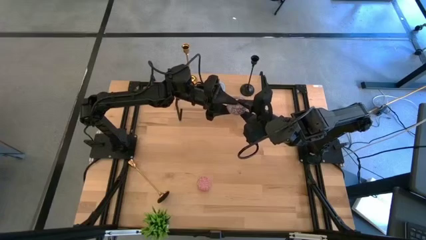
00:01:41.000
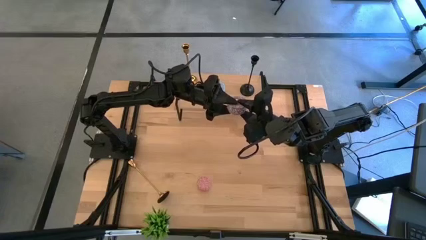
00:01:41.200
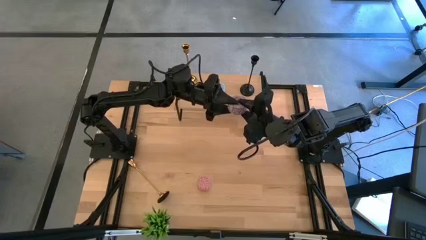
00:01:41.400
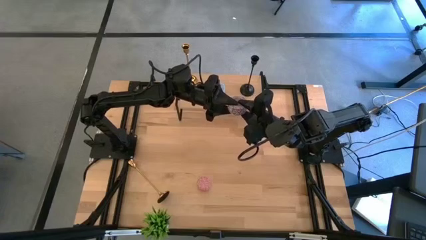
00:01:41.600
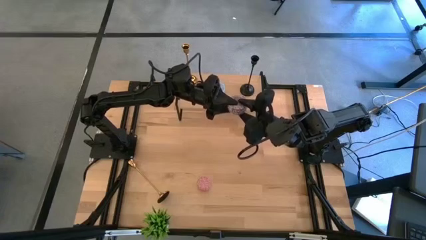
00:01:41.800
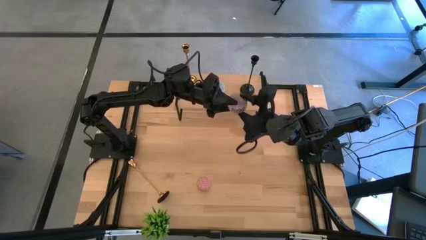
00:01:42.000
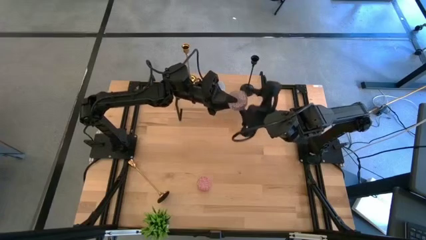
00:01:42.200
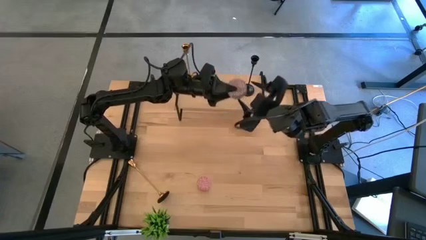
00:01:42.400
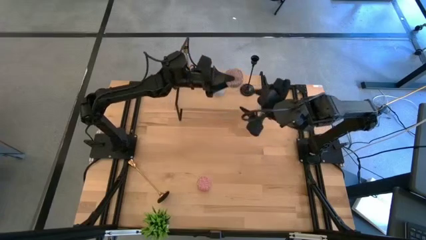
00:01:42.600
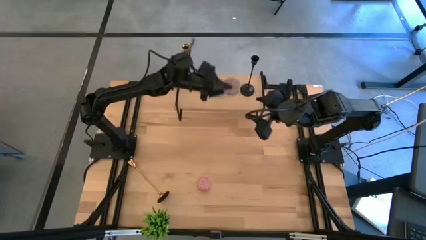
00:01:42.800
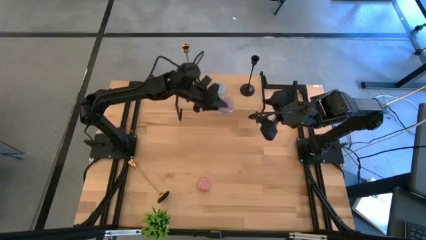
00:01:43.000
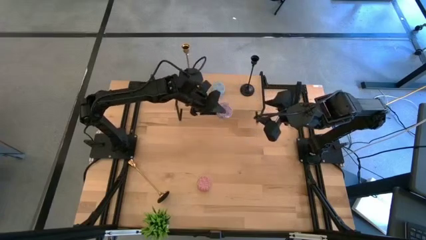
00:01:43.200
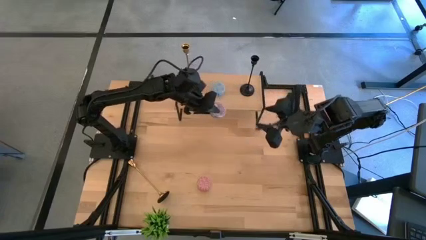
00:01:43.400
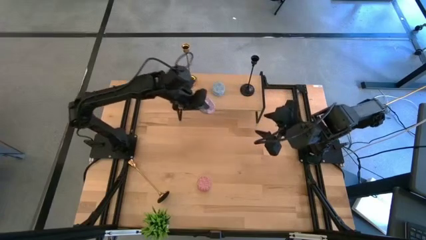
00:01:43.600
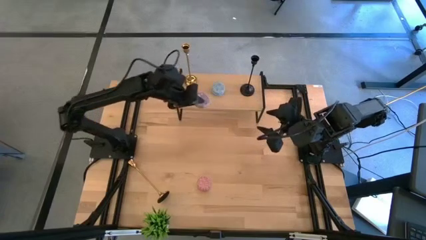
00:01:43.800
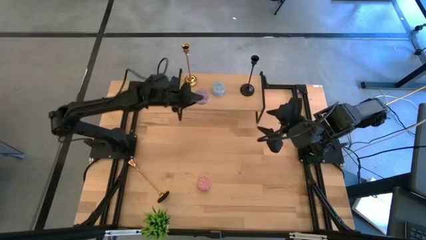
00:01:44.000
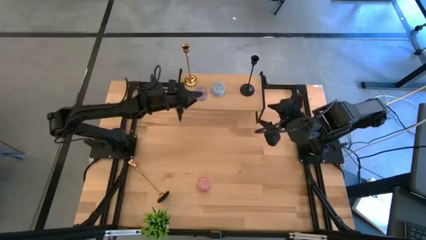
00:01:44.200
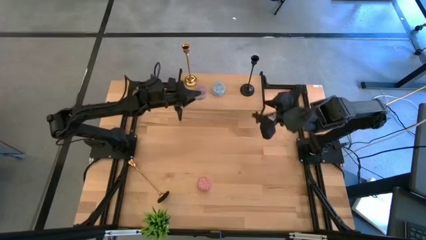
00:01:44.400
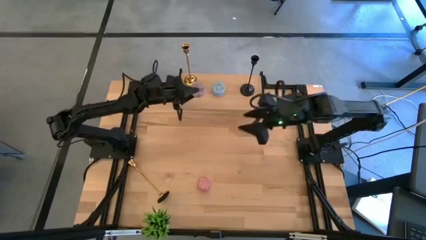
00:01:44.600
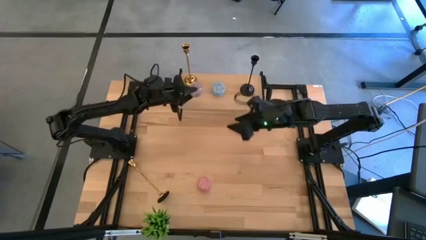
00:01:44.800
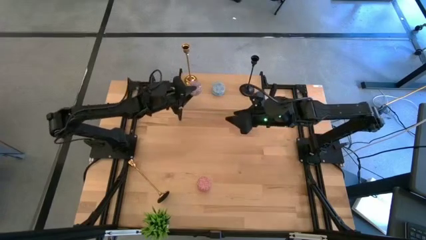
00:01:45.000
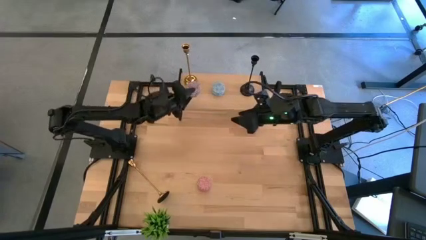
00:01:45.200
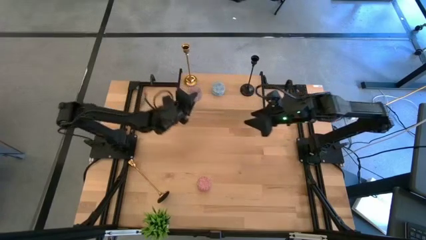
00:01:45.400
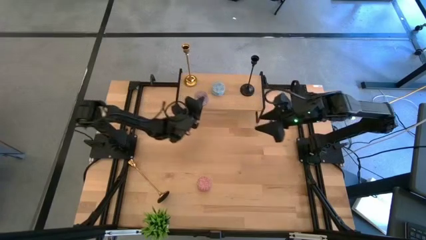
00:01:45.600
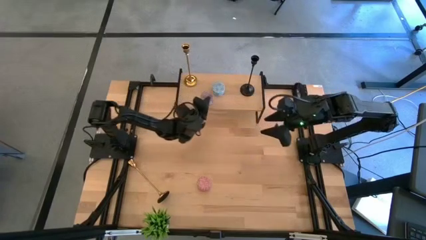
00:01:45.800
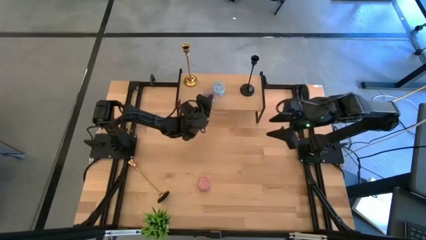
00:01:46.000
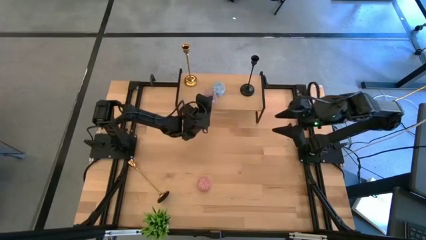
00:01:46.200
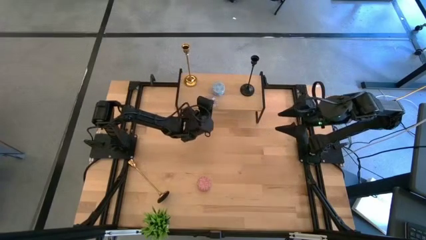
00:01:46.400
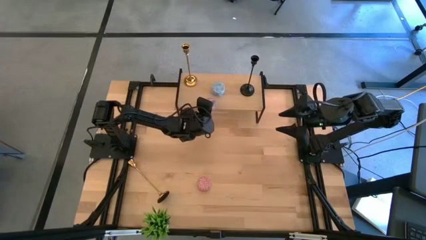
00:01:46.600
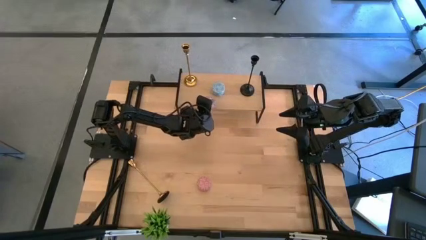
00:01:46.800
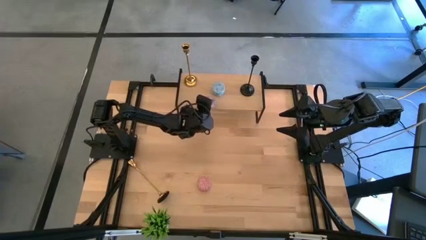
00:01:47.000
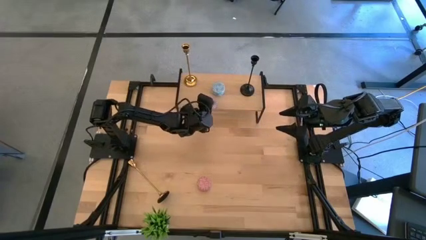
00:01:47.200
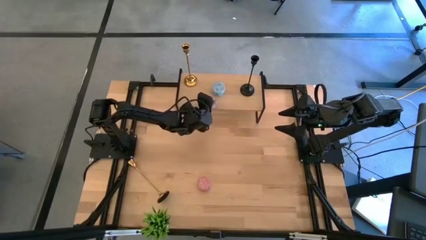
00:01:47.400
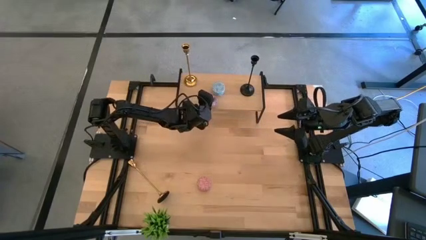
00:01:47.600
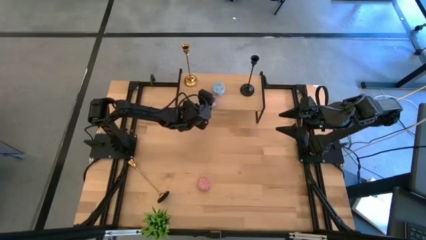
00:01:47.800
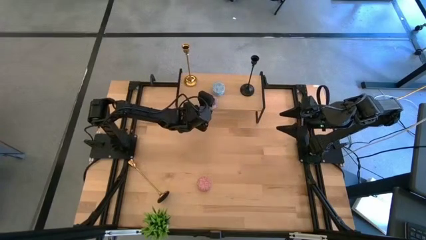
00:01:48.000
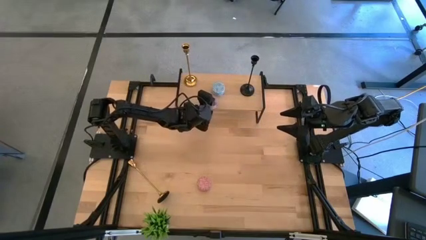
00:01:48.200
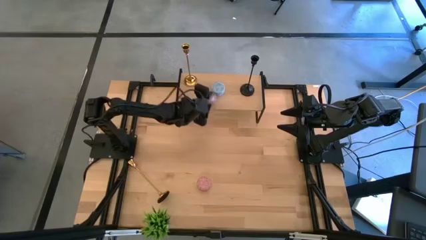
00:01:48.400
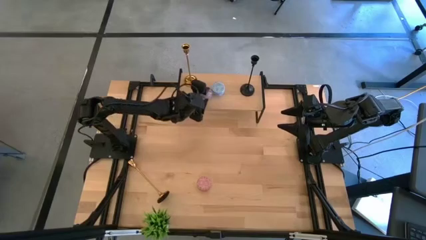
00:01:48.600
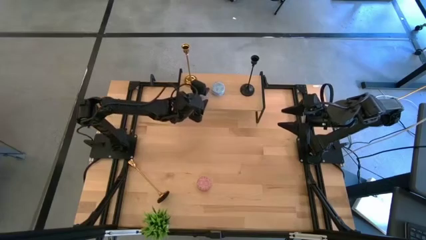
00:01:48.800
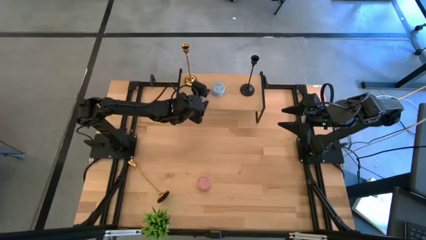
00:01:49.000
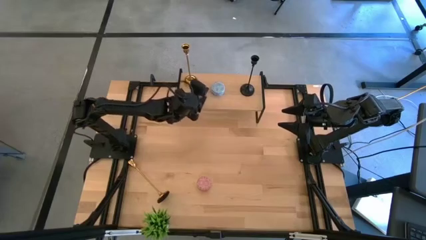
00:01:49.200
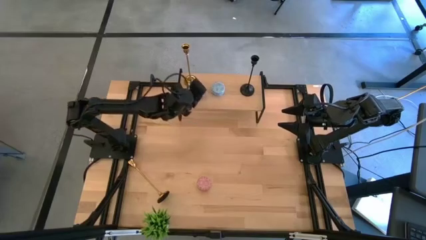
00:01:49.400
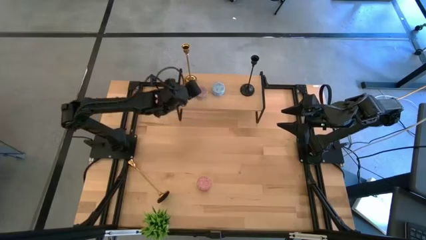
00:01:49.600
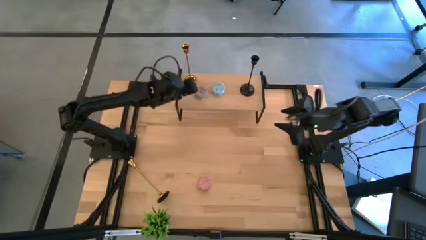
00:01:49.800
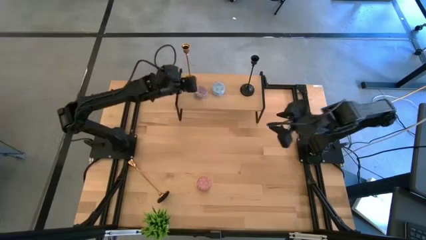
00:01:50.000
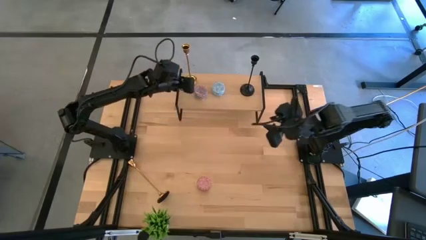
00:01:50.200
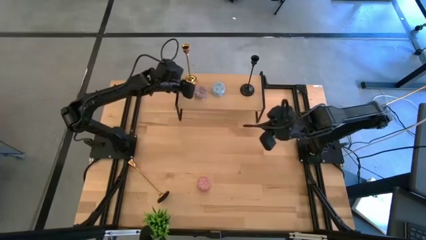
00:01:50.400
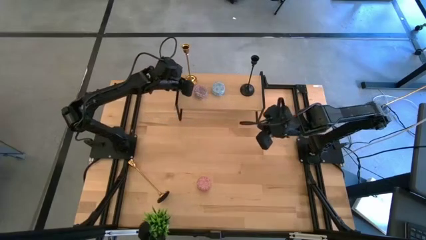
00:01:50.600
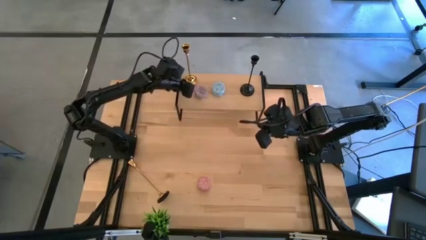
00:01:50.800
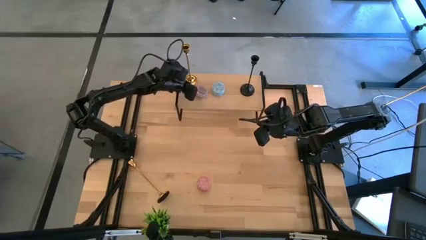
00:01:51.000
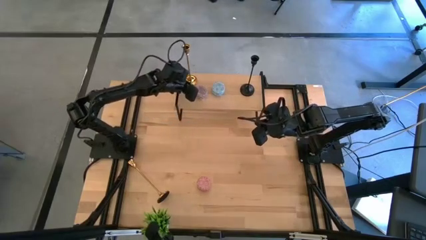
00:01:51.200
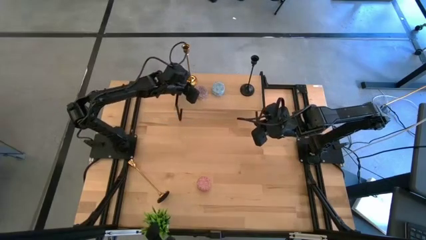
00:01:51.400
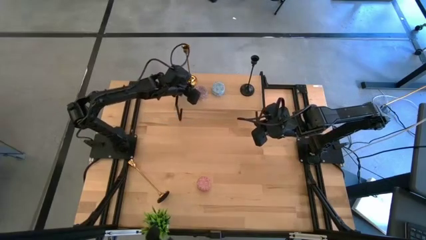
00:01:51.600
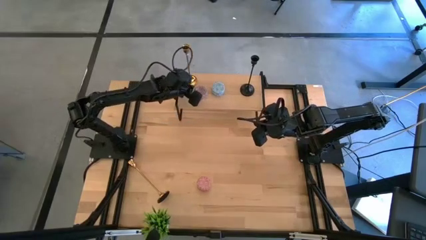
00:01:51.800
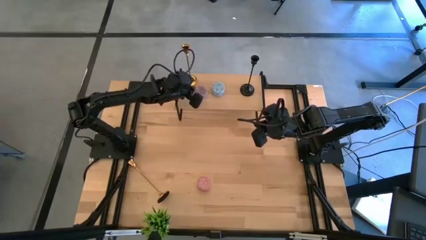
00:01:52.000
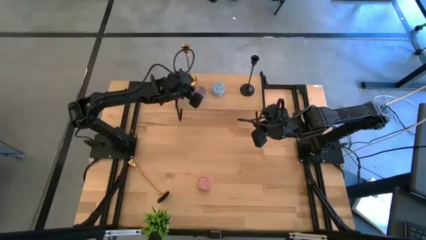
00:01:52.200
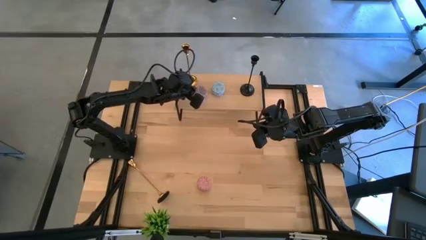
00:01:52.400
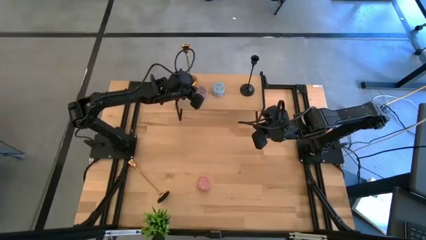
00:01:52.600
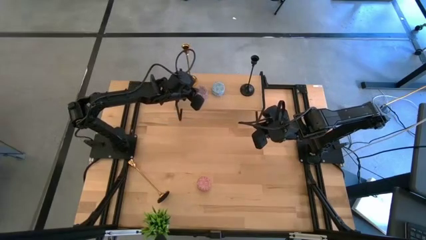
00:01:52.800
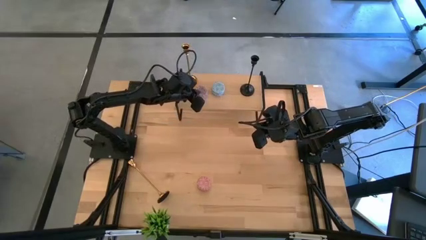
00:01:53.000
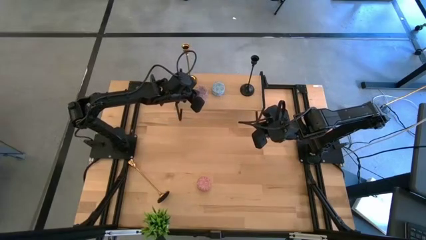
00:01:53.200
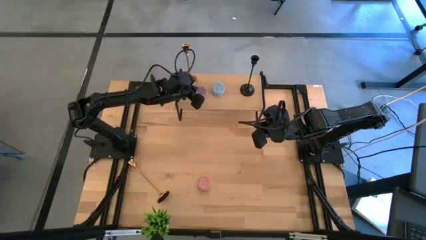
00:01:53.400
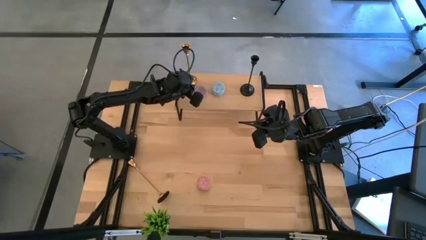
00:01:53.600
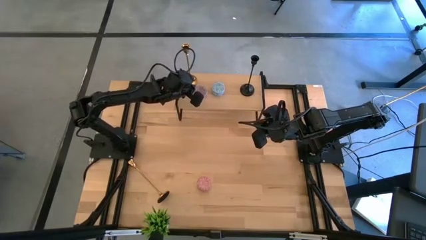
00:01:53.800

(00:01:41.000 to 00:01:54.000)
Task: Pick & Place candle stick holders
Put the red scented candle on the shelf

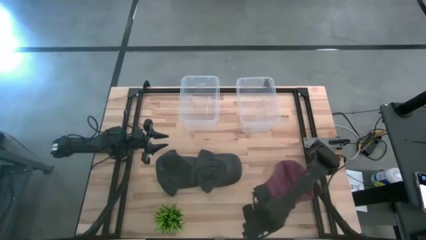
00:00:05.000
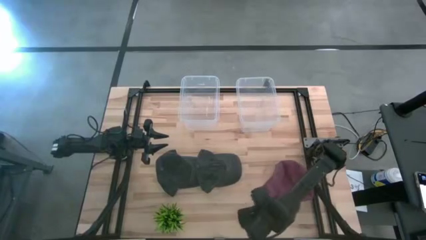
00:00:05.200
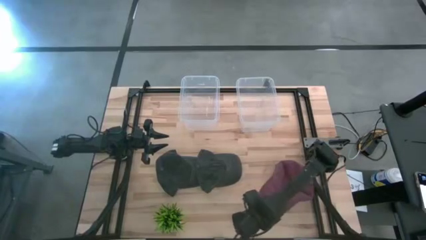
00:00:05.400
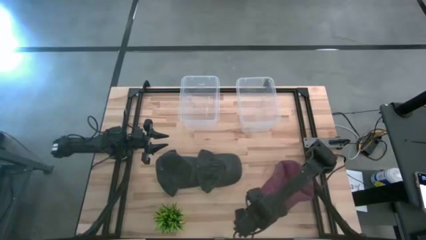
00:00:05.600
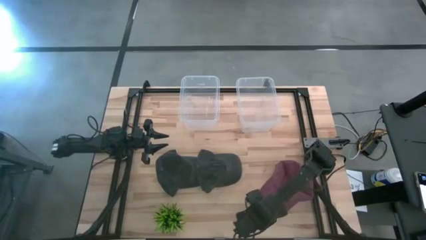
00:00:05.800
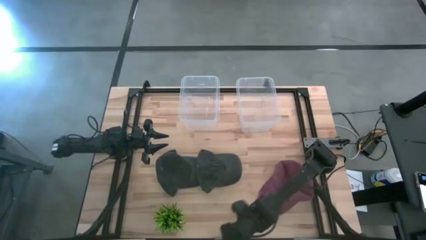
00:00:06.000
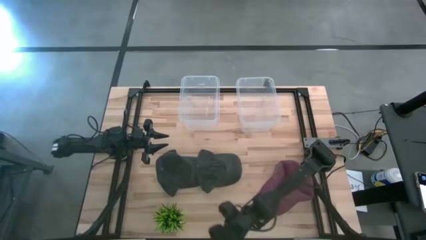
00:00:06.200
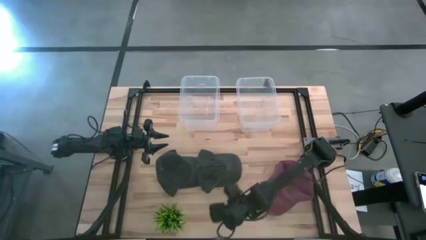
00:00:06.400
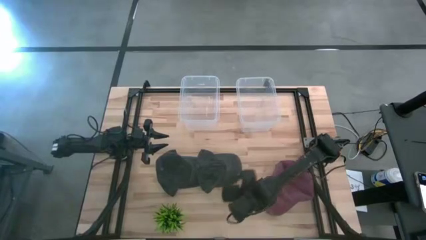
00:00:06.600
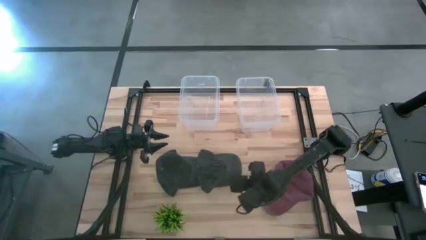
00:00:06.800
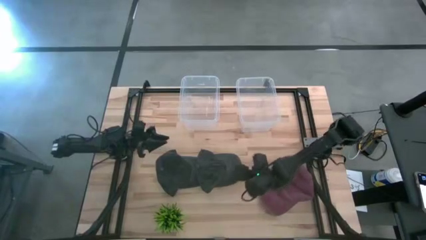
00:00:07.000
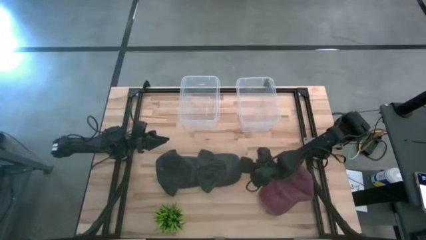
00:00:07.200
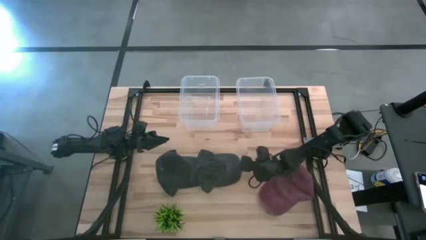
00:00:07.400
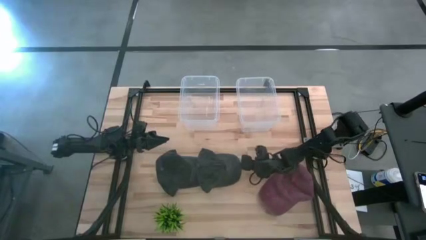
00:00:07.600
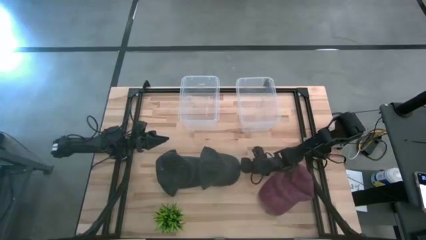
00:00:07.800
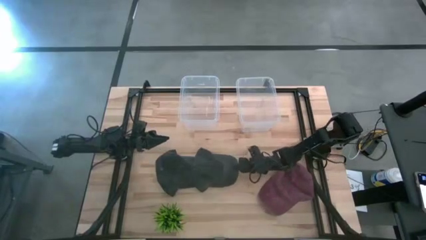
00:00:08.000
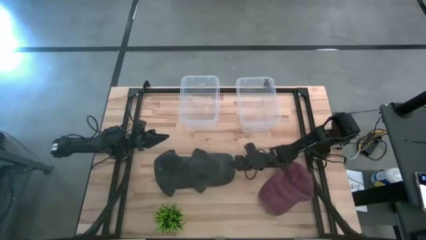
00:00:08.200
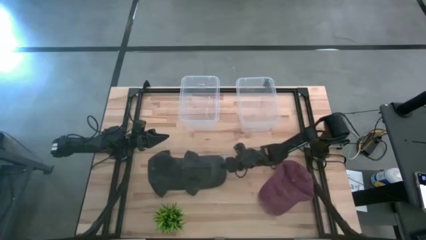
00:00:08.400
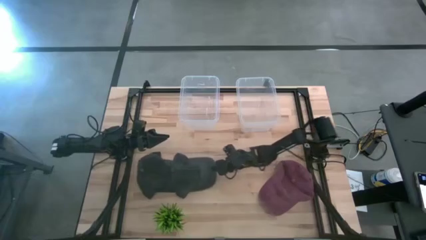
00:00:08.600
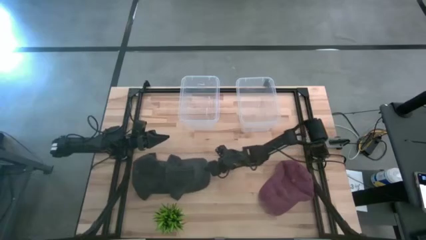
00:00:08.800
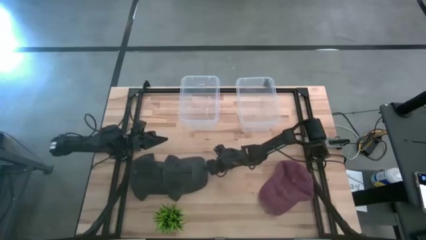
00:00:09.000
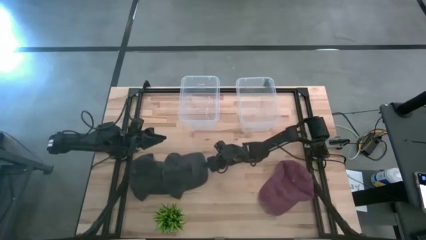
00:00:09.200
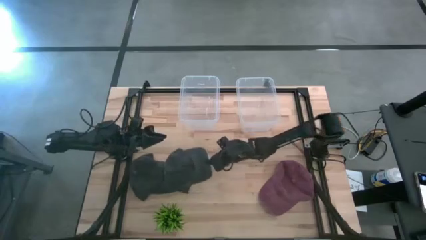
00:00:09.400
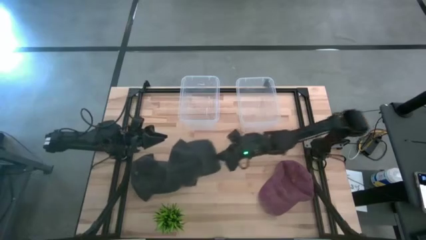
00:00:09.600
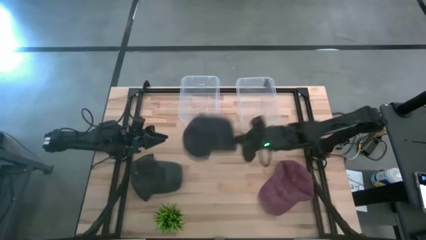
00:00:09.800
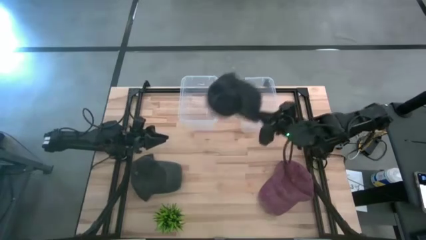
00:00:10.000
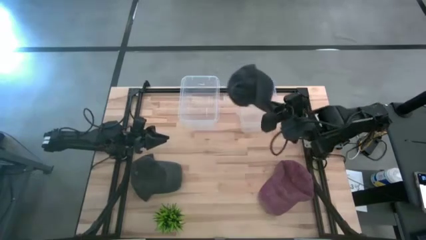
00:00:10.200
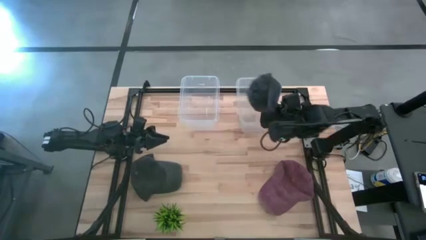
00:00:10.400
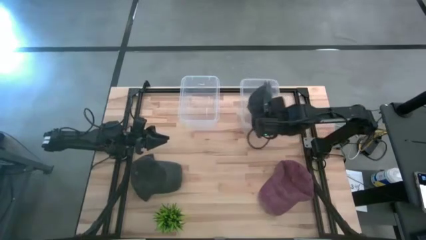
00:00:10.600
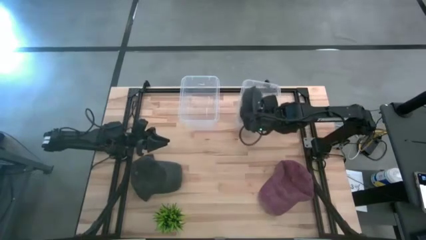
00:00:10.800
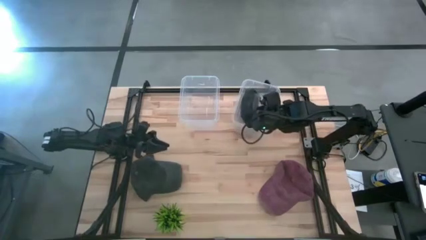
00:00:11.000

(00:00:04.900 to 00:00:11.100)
Task: Pick & Place hat
Put the black cap into the right transparent bin
